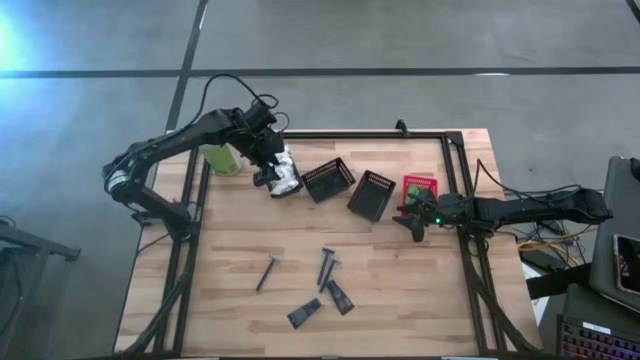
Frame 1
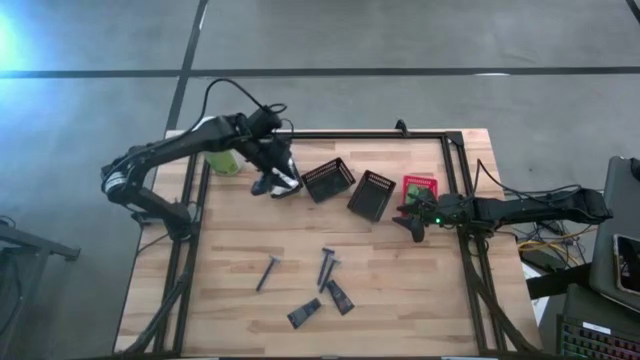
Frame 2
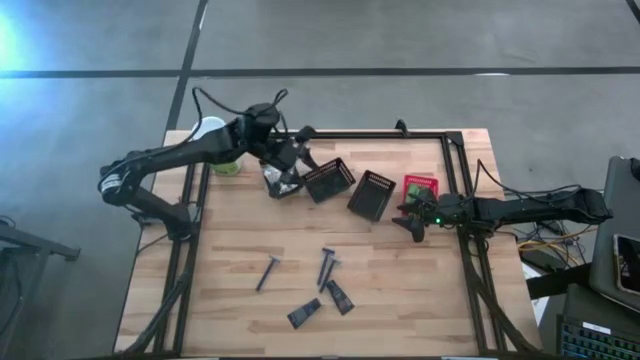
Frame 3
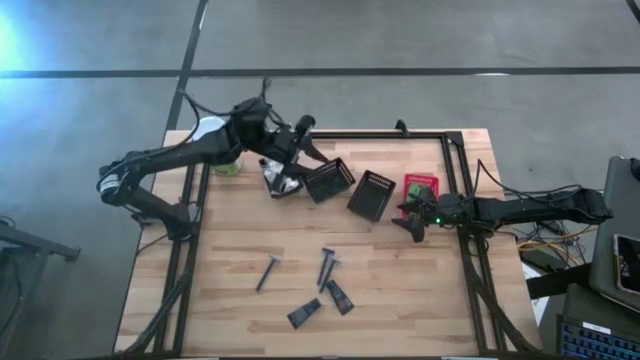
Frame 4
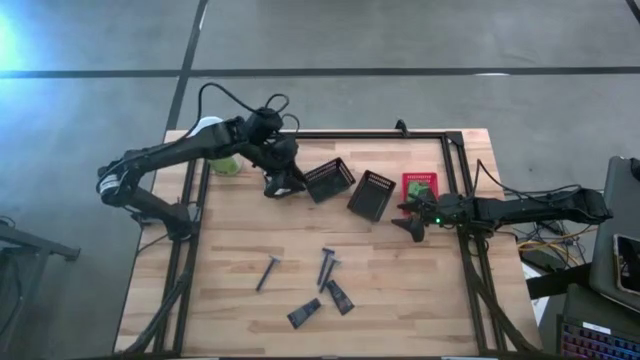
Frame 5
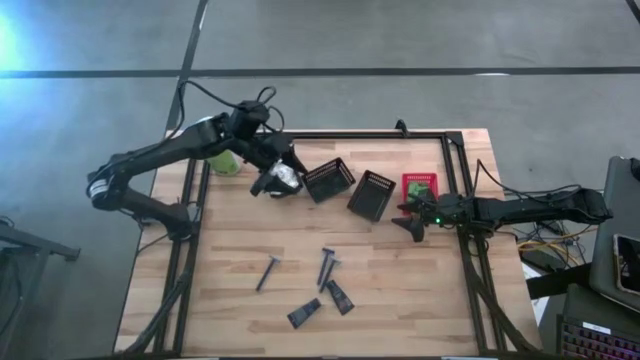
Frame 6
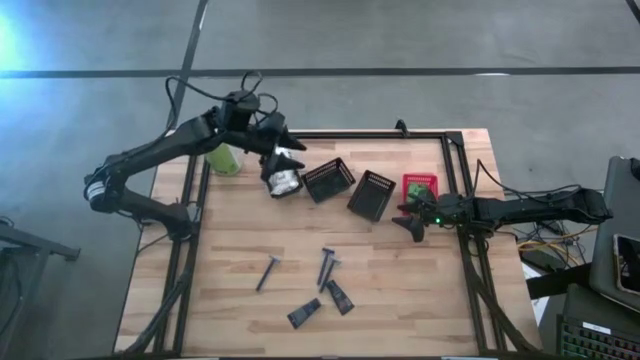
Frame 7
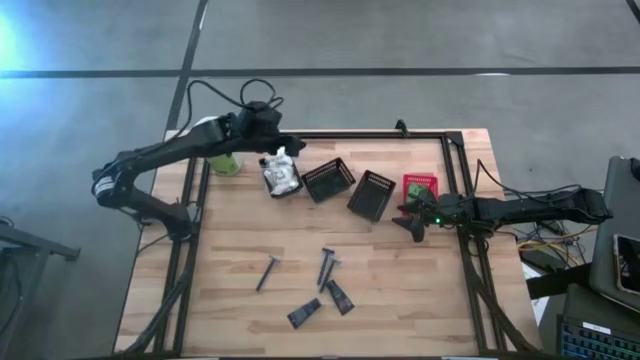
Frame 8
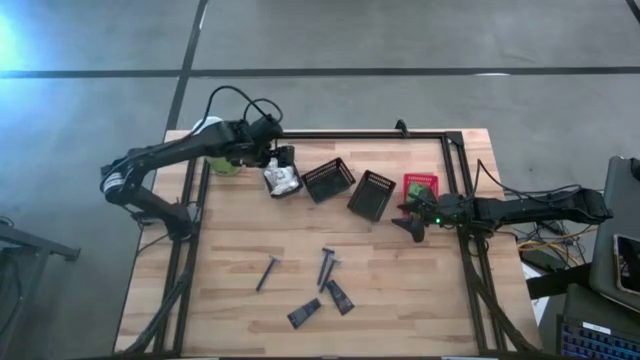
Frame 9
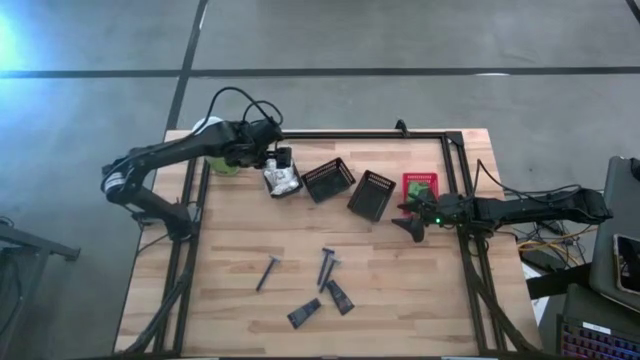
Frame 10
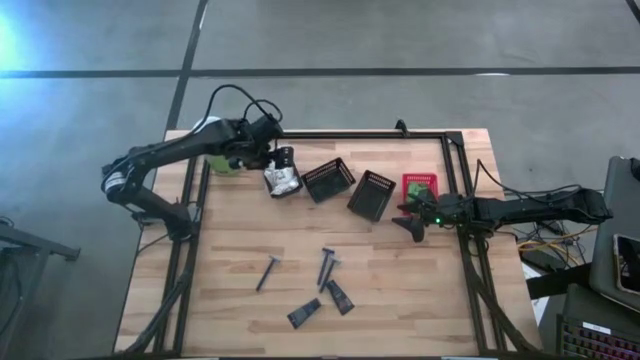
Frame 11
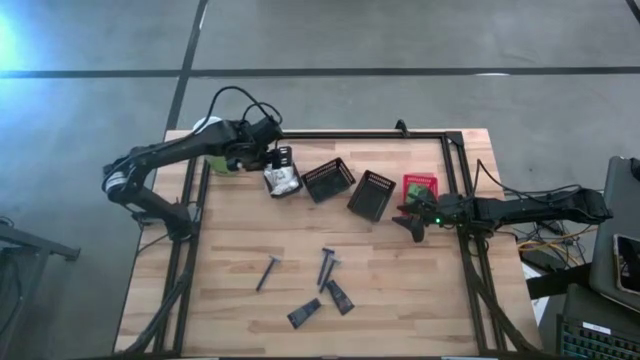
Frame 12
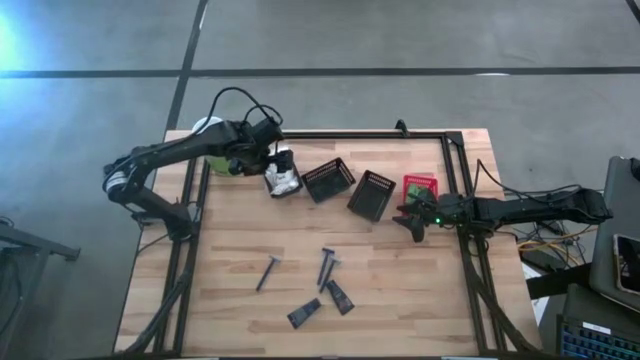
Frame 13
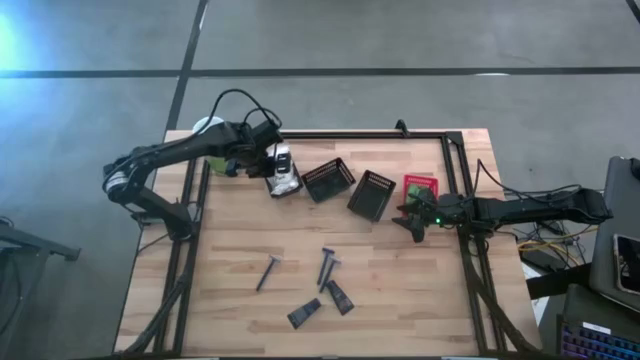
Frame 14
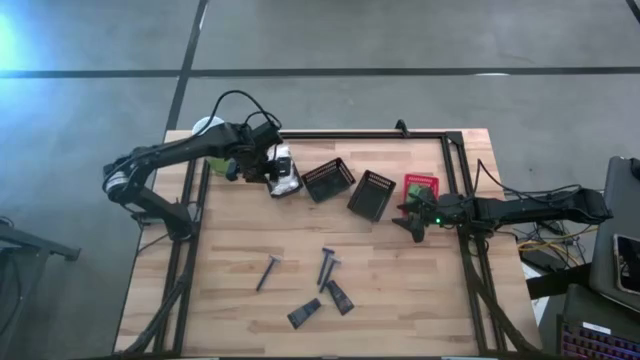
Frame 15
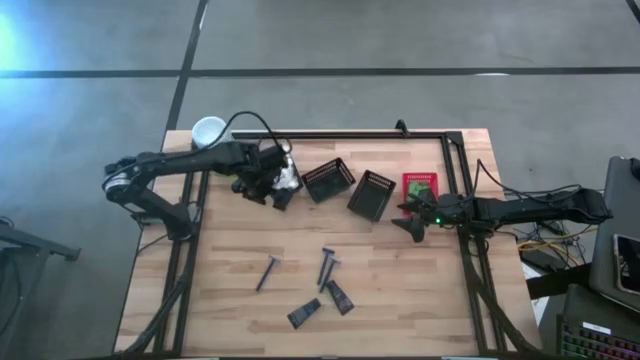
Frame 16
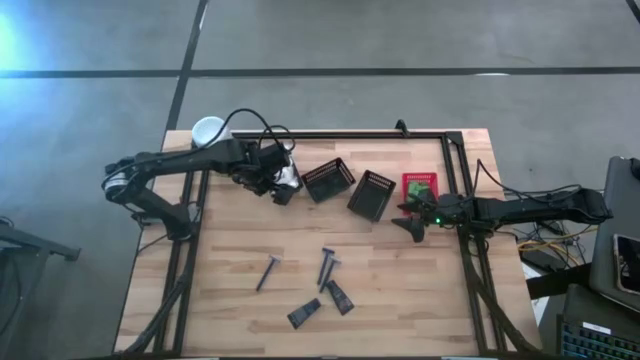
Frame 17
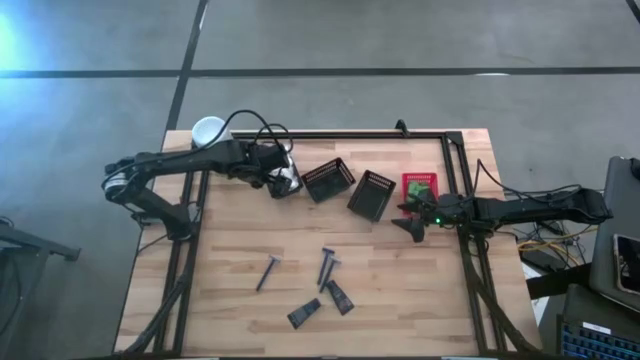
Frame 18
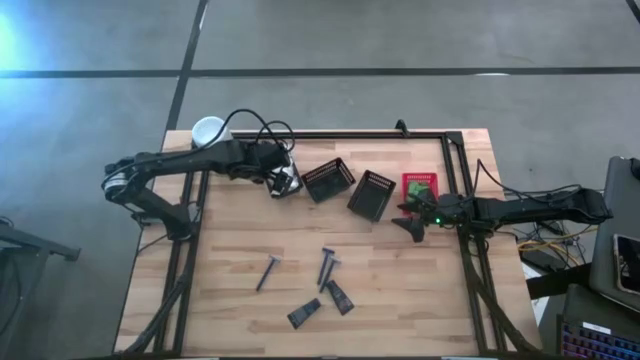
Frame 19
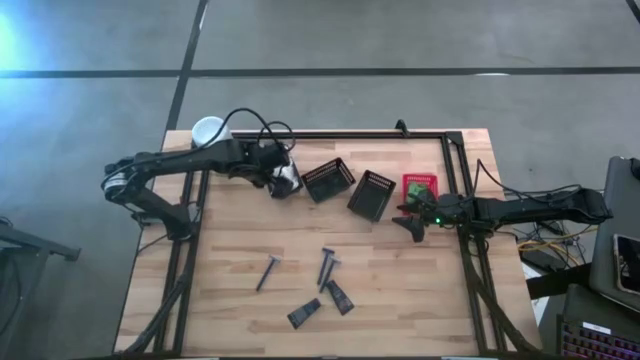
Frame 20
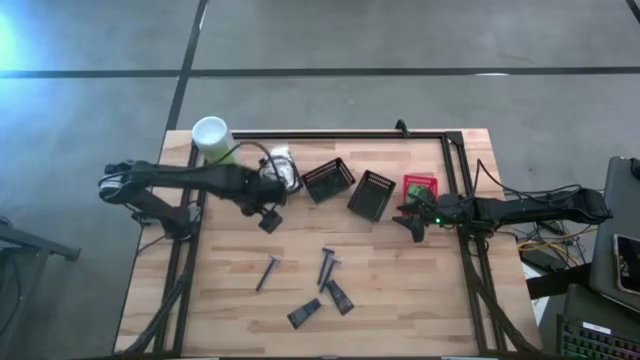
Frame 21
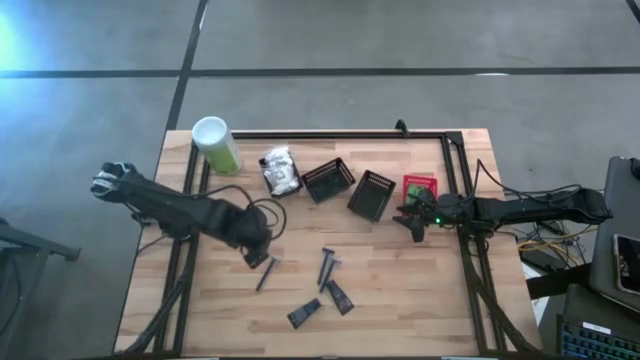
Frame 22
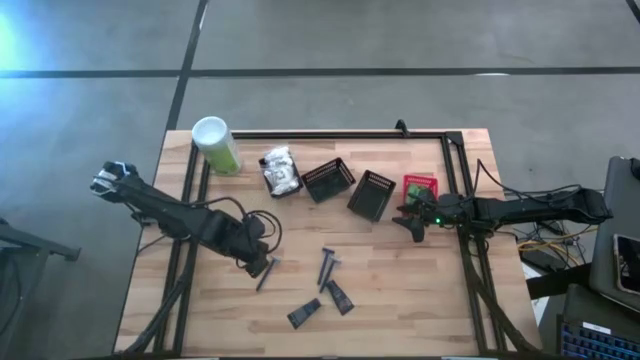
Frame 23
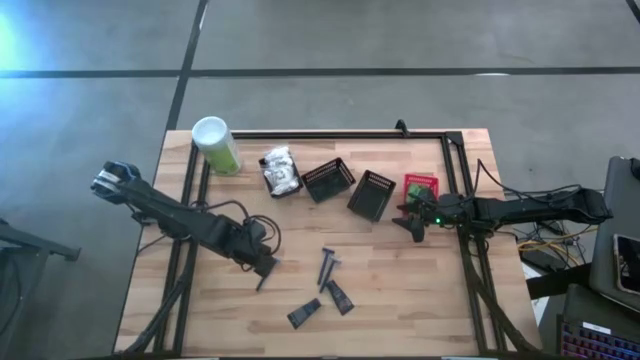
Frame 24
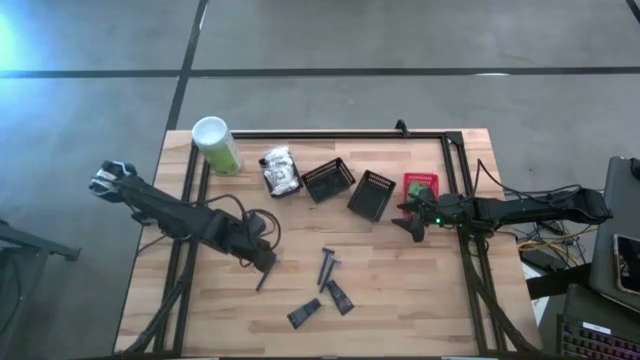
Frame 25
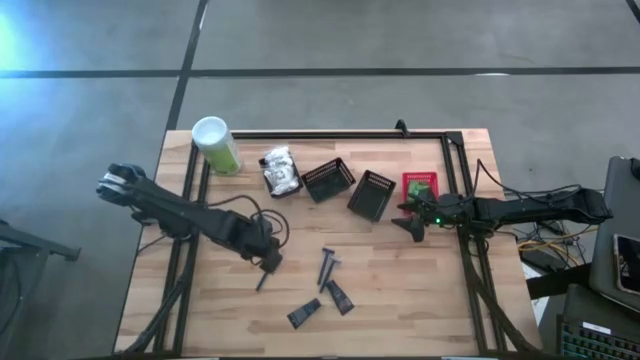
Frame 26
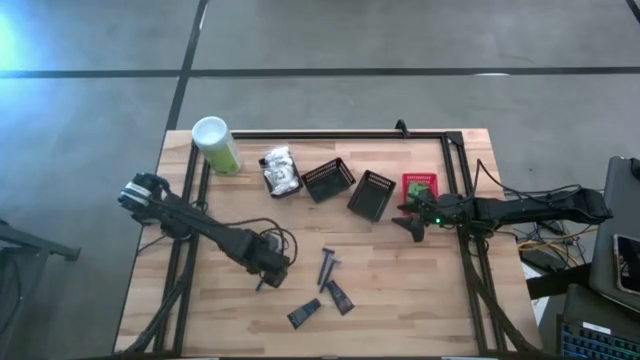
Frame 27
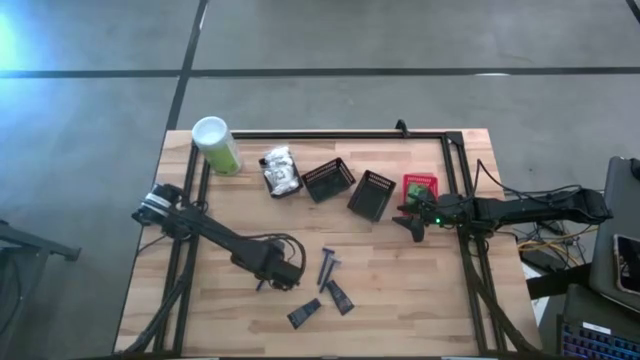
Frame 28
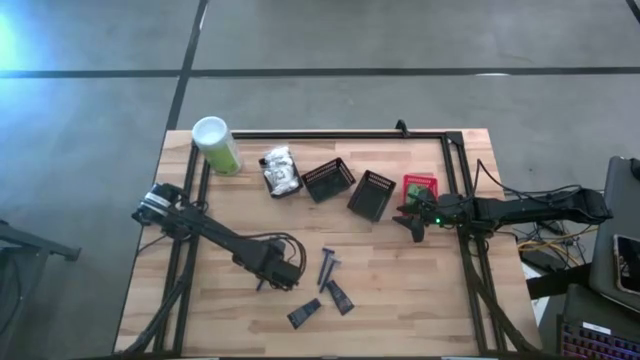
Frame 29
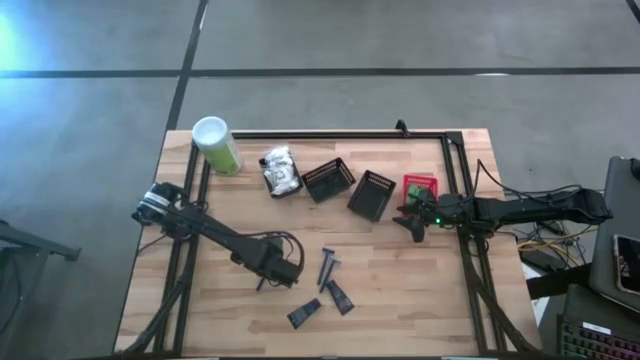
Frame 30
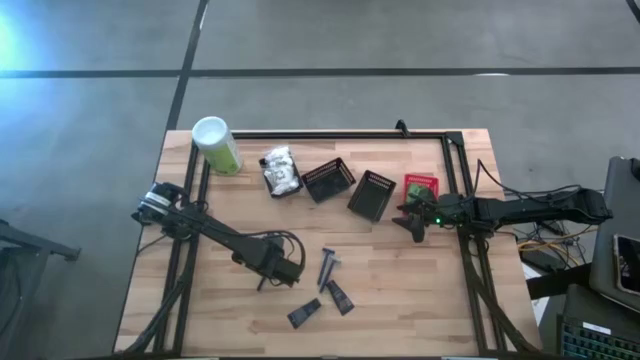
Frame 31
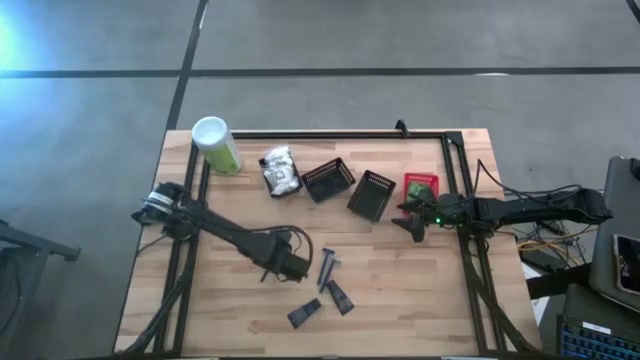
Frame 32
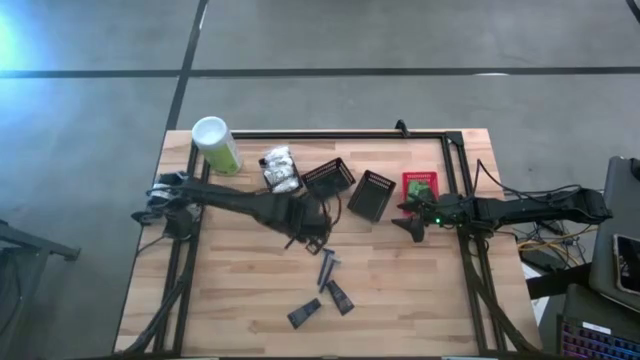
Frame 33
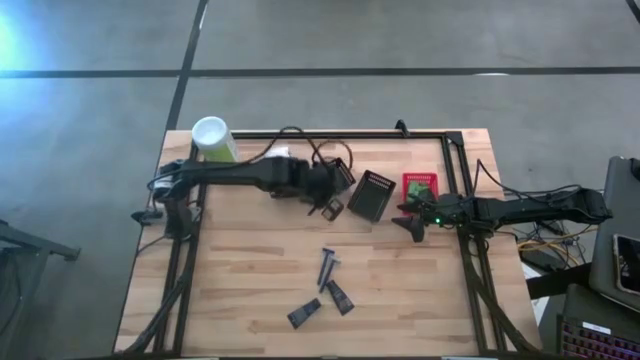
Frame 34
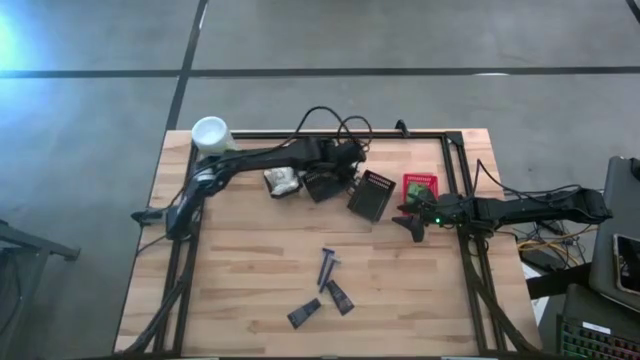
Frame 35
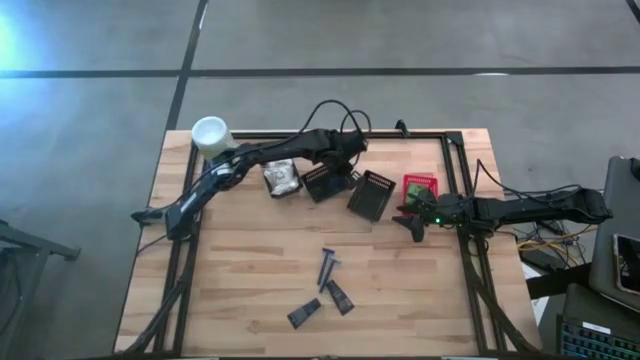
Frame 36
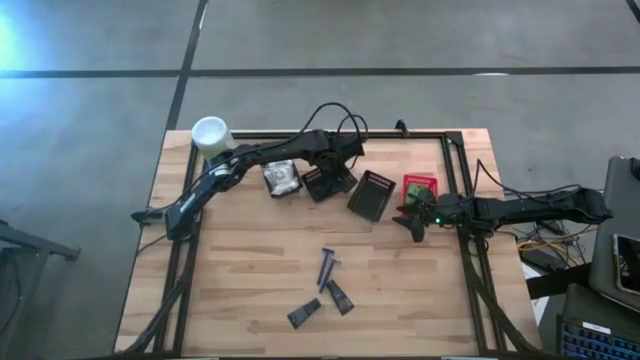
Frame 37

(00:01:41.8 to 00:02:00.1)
Task: Pick & Place Travel size toiletries
Put the left razor into the middle black bin

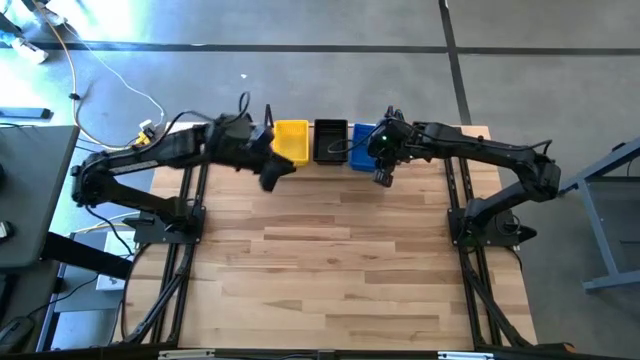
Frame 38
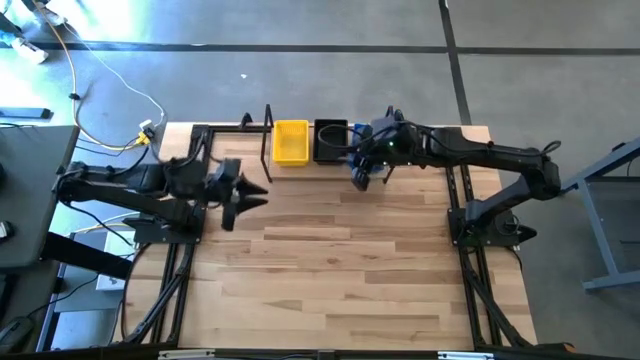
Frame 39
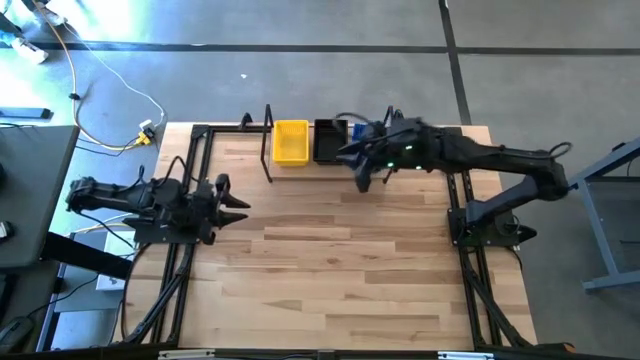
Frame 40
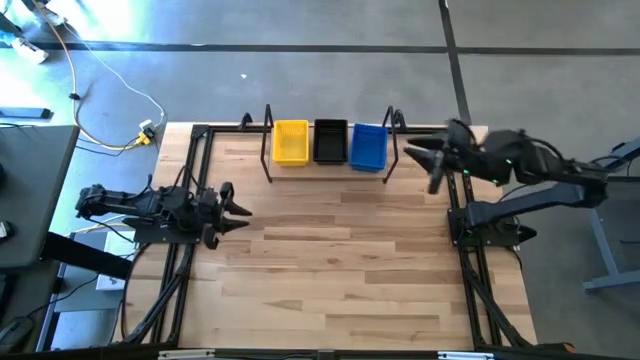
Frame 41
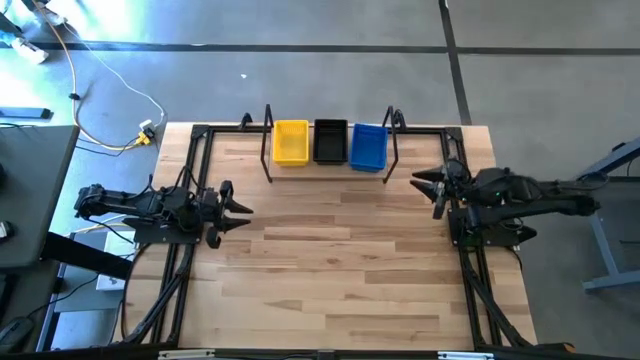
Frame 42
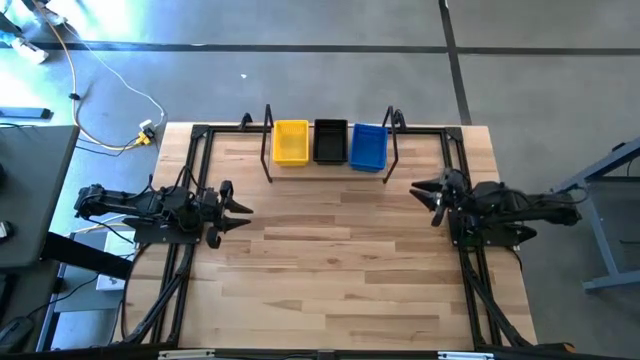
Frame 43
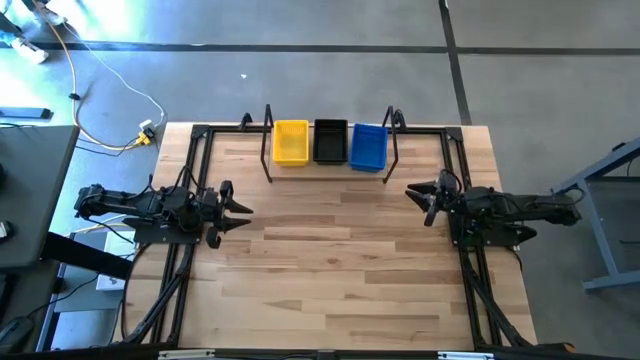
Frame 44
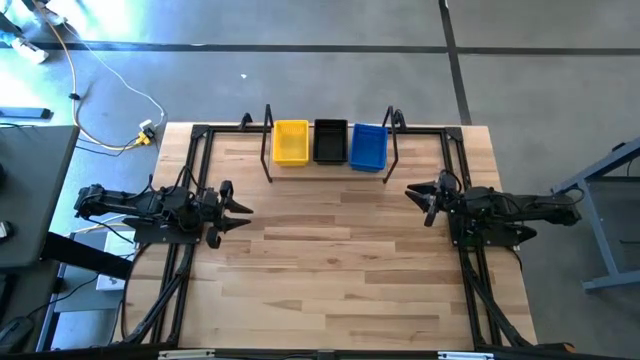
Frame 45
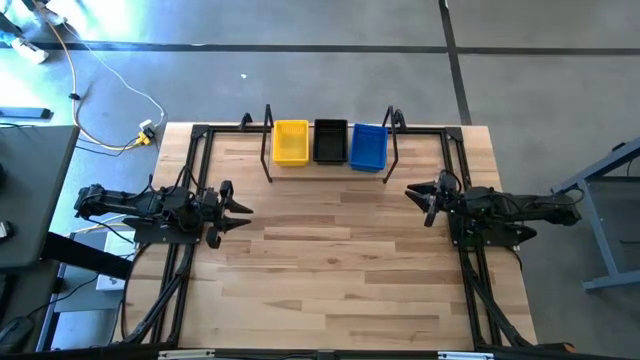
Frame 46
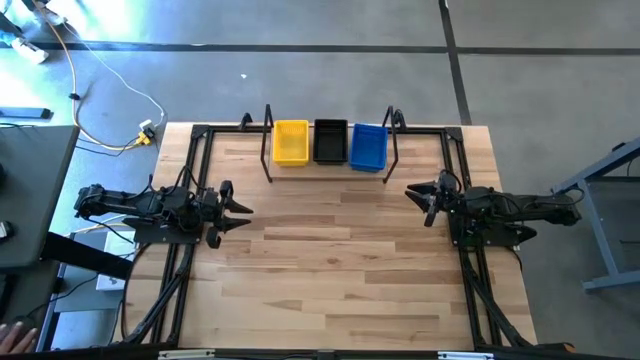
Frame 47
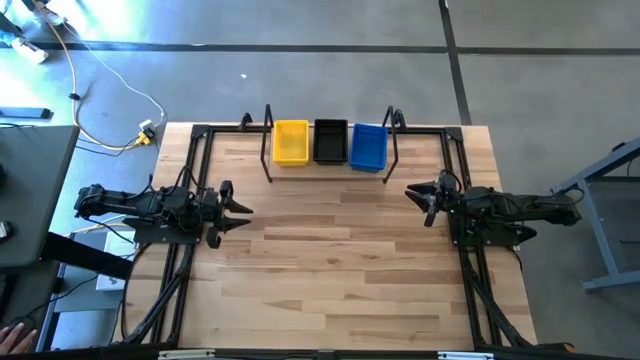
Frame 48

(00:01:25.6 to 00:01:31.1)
Task: Stack baskets on shelf by color
Return to Home Position
